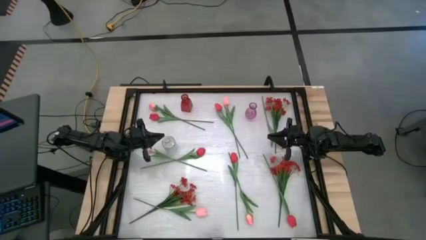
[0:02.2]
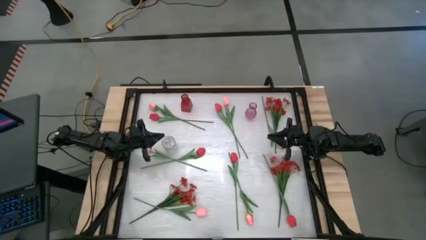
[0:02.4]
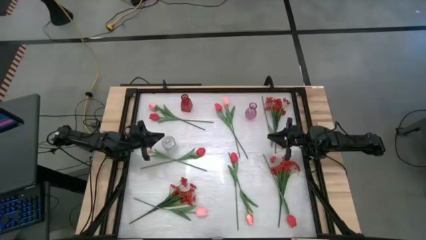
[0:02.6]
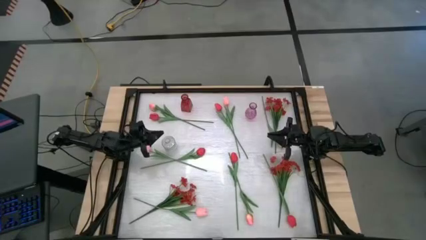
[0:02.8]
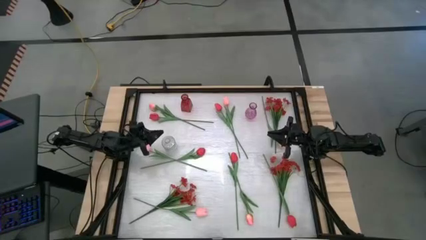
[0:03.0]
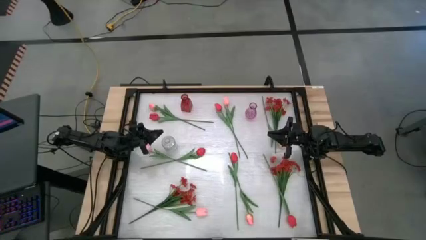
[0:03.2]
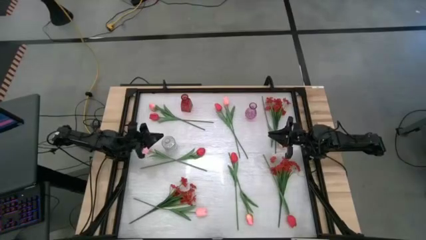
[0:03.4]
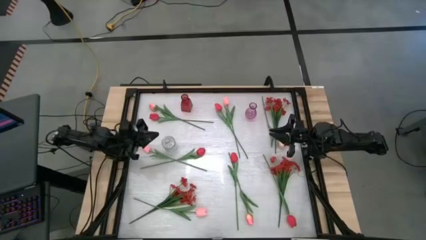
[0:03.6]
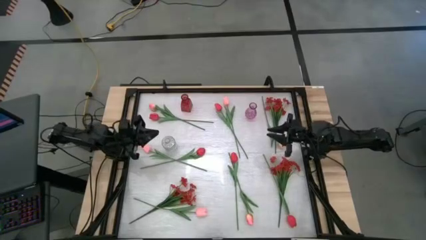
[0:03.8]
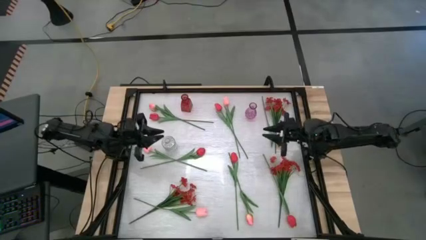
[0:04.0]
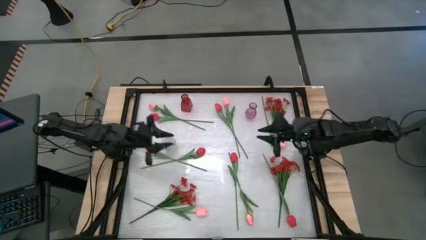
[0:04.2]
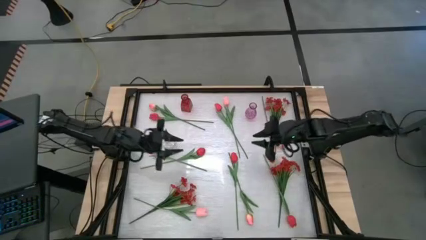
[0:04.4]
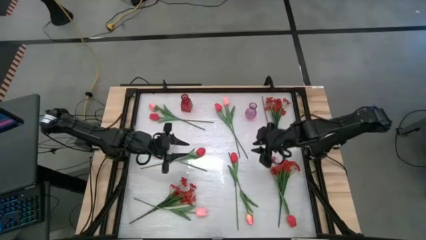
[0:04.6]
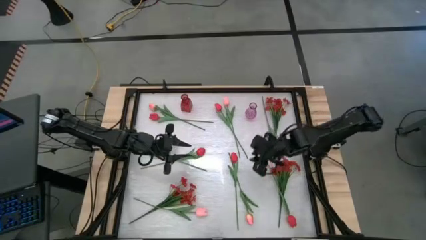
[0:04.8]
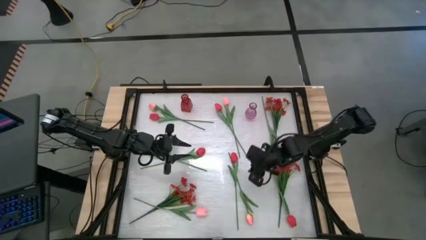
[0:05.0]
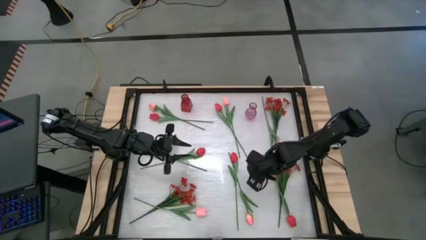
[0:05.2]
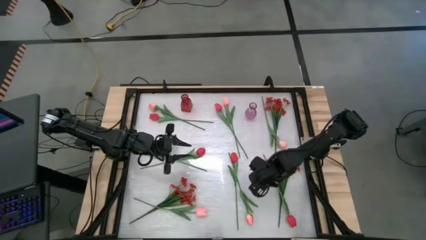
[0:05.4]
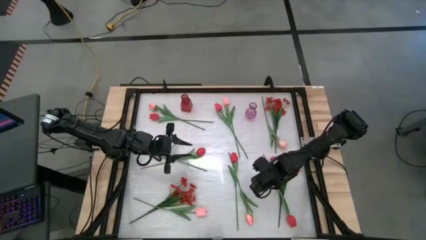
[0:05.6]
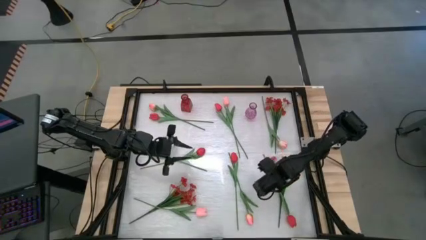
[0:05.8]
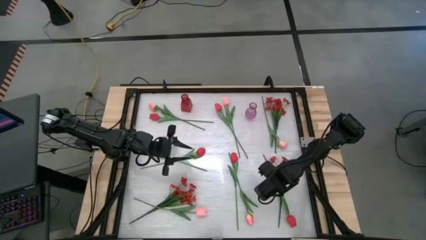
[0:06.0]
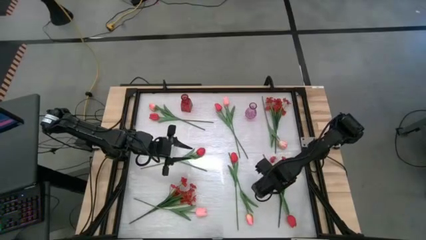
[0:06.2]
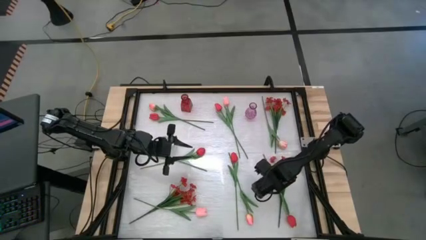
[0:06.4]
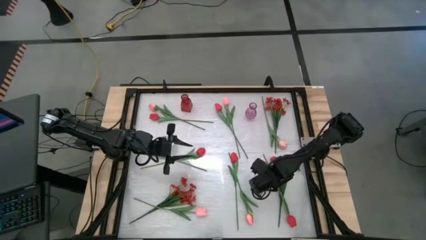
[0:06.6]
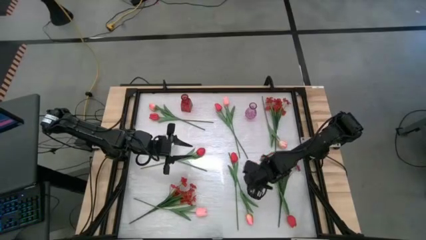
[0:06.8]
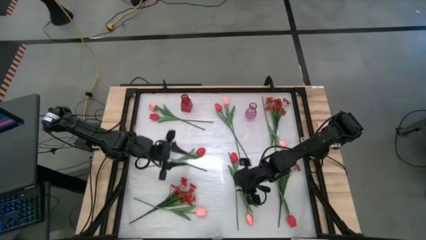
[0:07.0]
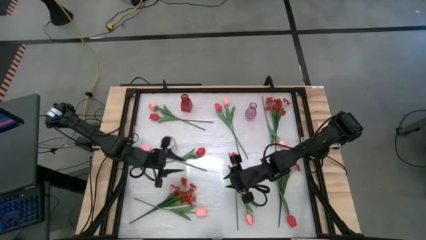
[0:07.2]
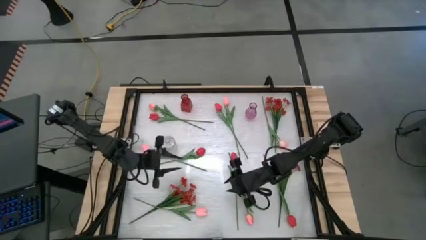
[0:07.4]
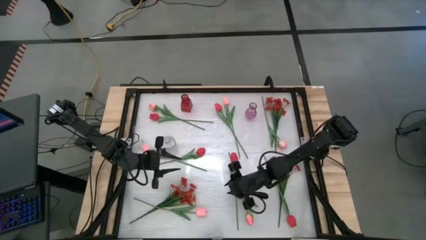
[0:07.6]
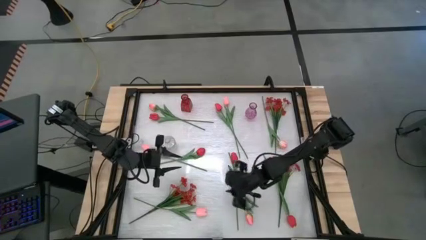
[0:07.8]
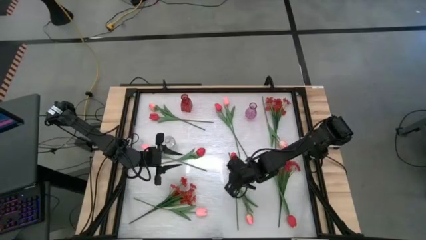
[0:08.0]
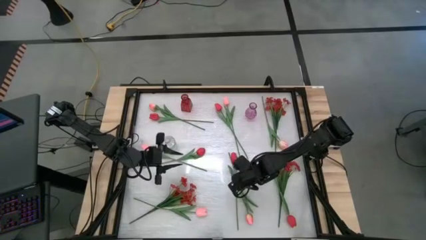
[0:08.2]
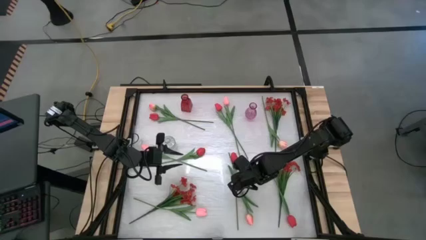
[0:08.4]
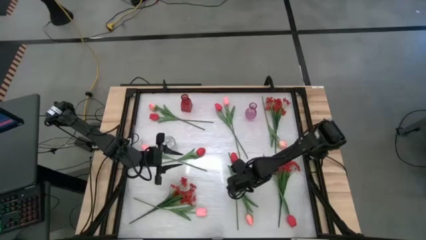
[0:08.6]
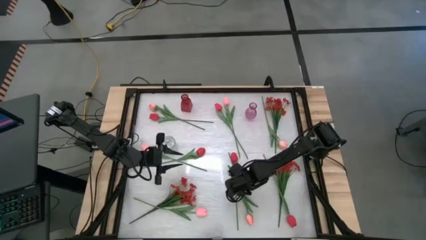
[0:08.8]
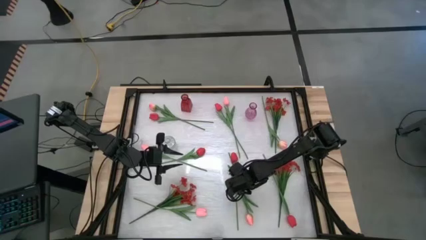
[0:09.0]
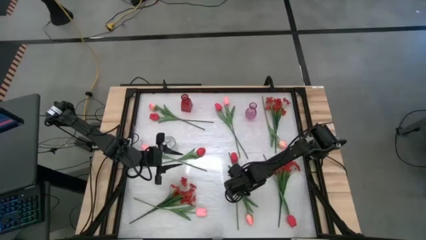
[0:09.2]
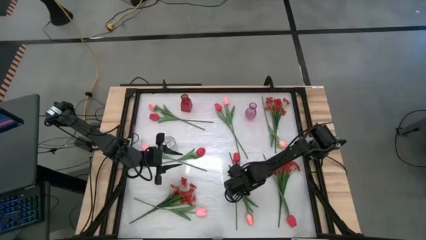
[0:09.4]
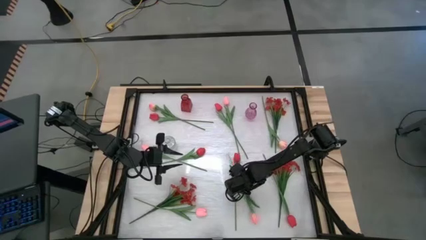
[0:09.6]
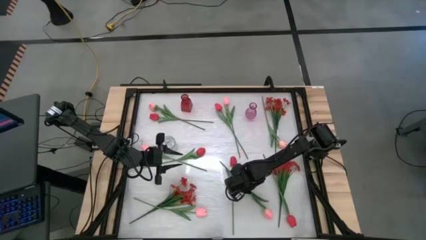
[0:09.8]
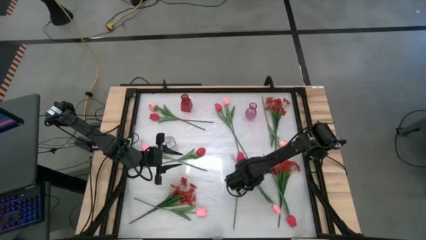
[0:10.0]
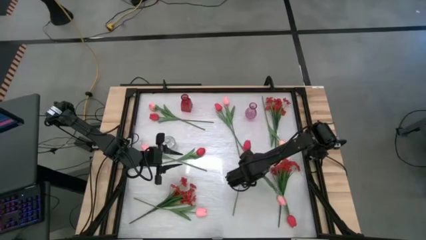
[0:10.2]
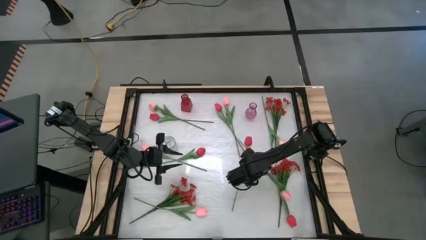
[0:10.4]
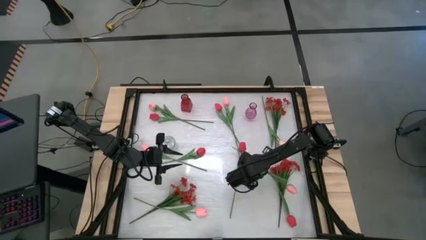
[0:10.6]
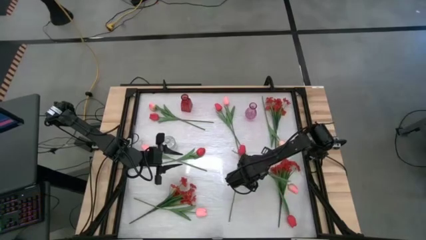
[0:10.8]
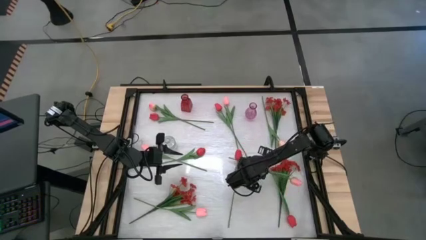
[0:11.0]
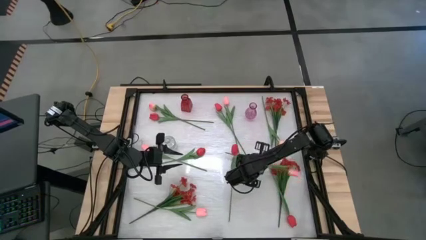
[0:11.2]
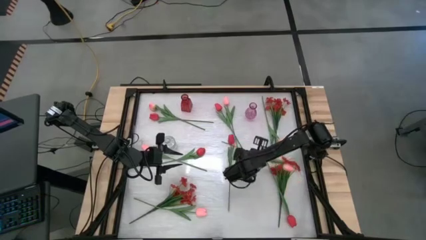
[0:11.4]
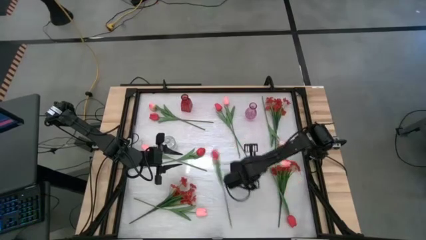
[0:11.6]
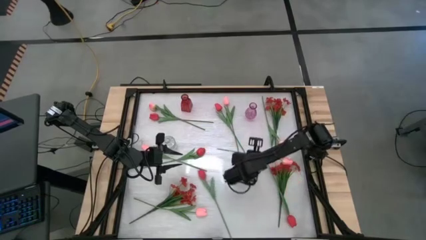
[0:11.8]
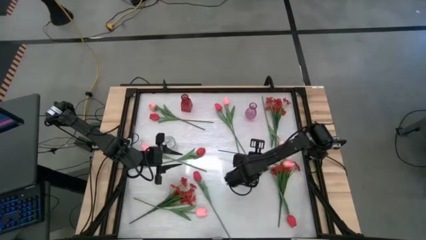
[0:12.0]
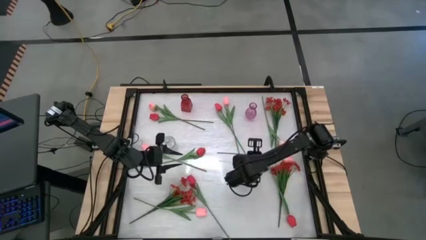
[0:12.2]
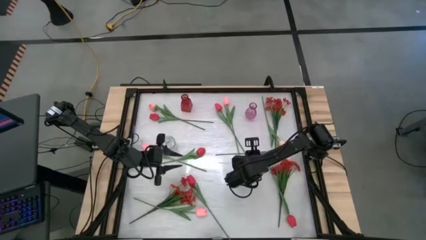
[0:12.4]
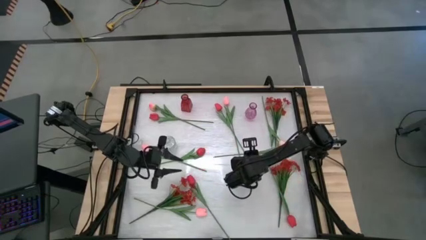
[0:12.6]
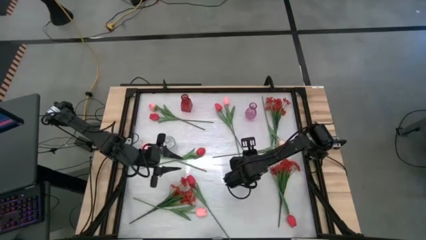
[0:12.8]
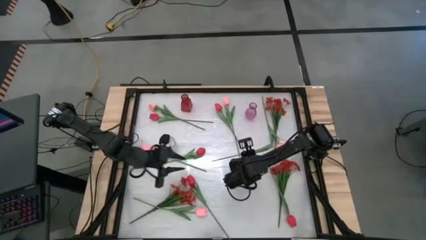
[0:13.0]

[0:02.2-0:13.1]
Task: Sort flowers into vase by color
Put the pink tulip into the purple vase
